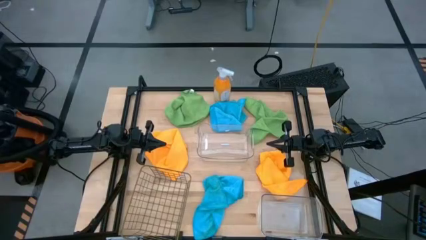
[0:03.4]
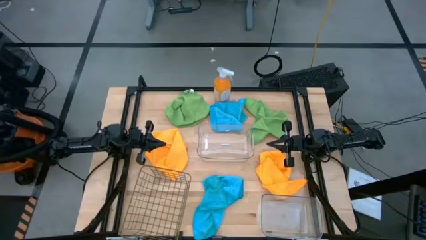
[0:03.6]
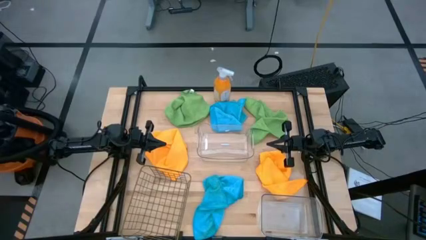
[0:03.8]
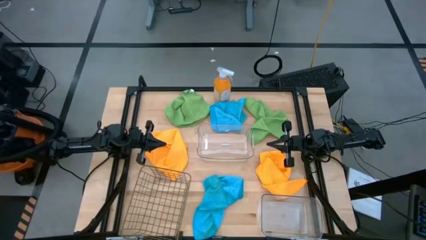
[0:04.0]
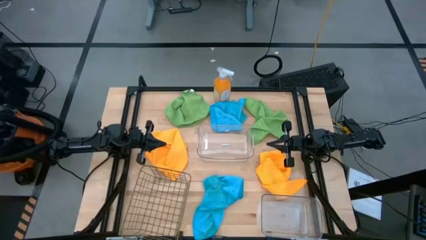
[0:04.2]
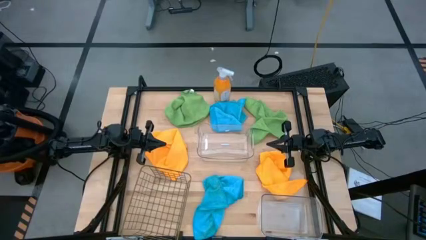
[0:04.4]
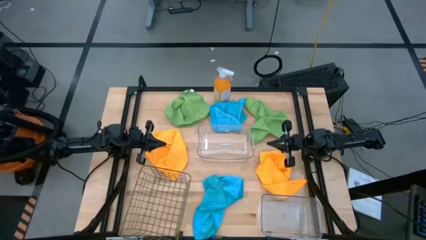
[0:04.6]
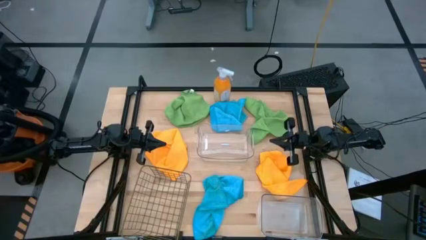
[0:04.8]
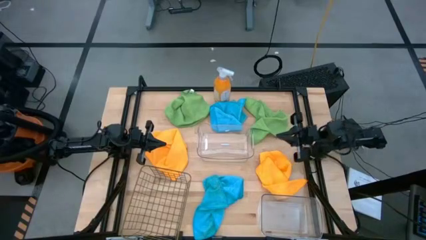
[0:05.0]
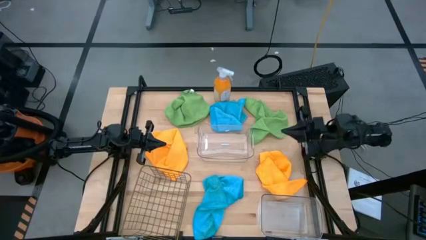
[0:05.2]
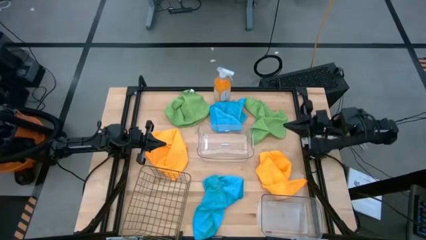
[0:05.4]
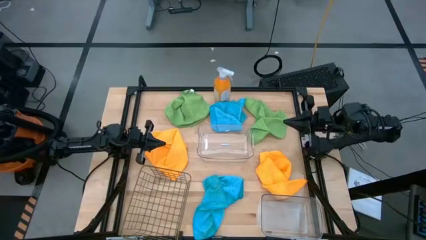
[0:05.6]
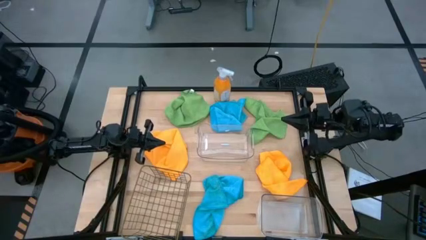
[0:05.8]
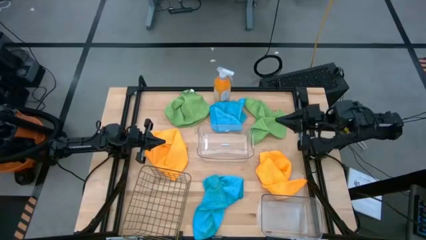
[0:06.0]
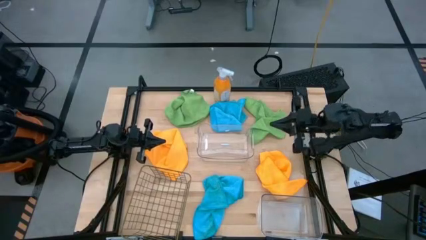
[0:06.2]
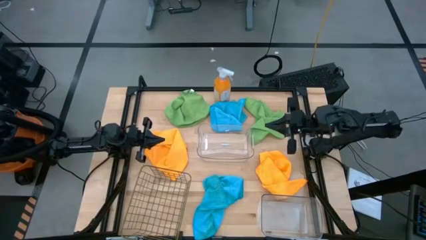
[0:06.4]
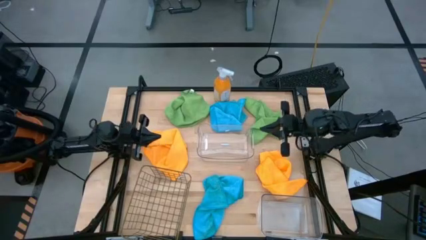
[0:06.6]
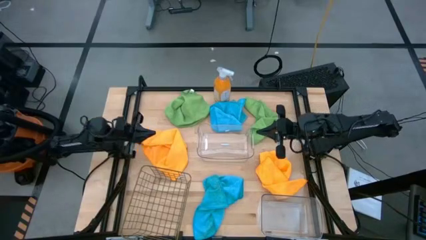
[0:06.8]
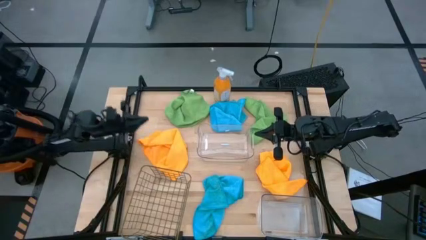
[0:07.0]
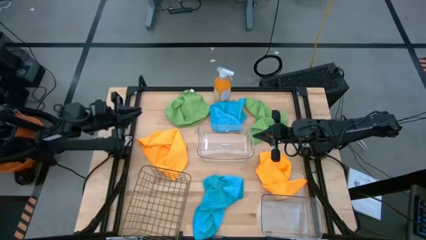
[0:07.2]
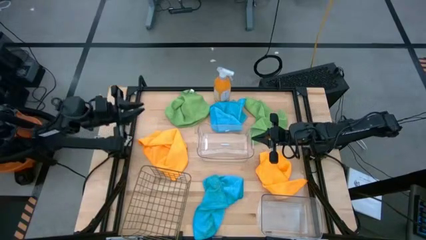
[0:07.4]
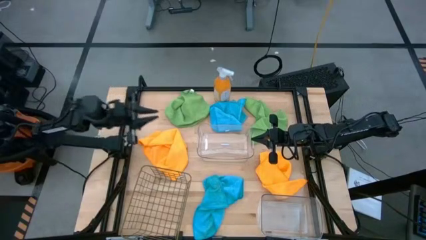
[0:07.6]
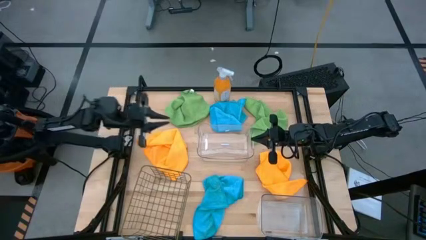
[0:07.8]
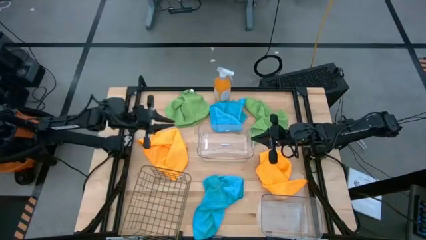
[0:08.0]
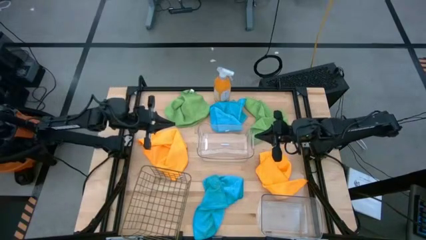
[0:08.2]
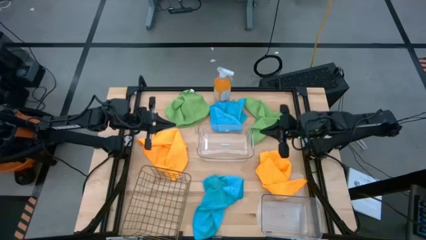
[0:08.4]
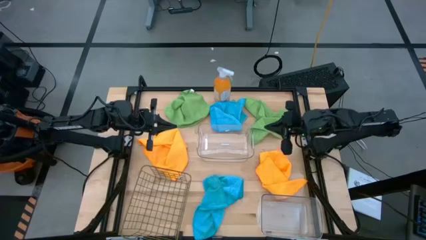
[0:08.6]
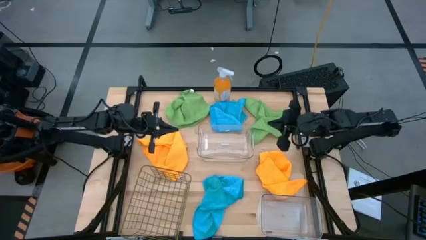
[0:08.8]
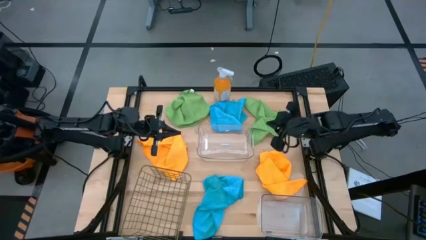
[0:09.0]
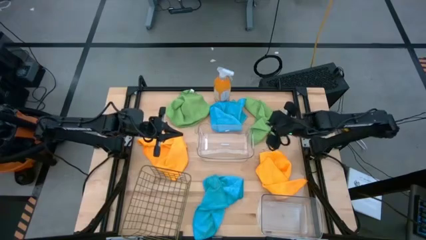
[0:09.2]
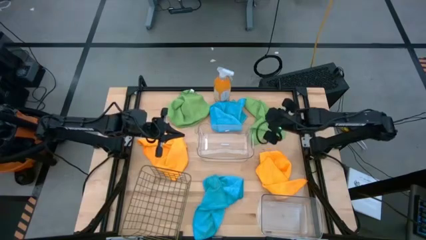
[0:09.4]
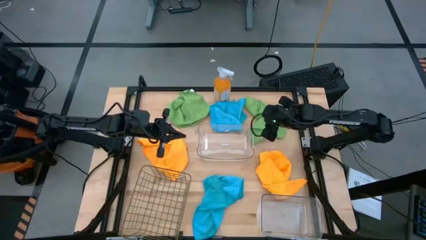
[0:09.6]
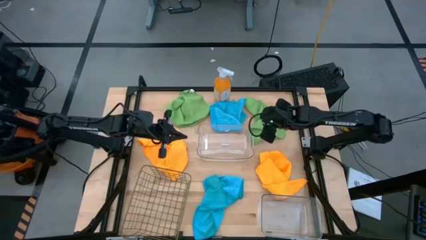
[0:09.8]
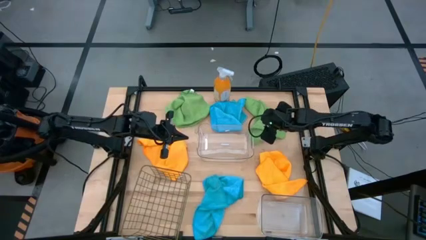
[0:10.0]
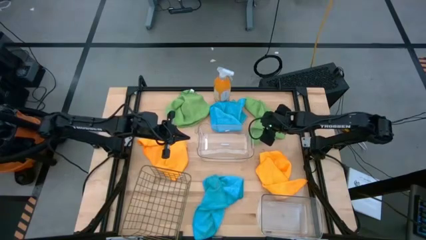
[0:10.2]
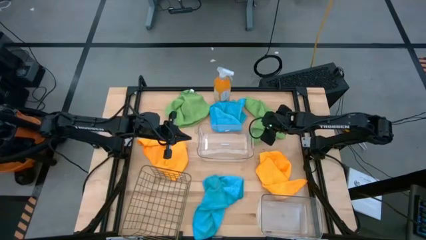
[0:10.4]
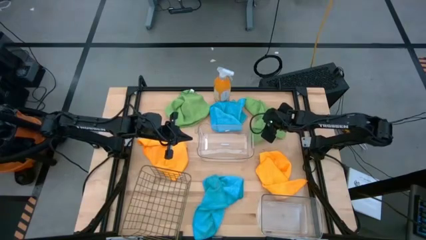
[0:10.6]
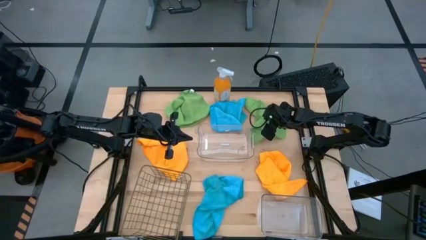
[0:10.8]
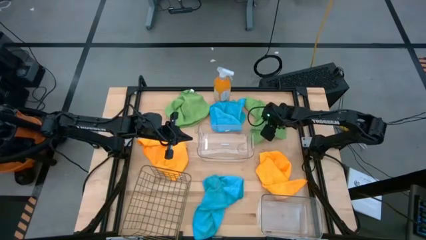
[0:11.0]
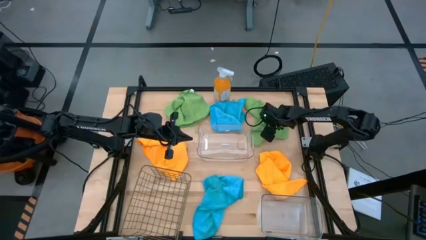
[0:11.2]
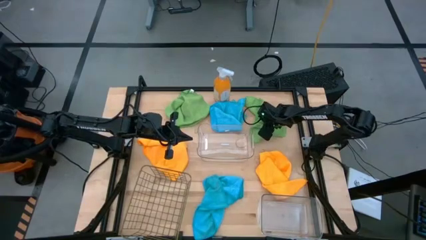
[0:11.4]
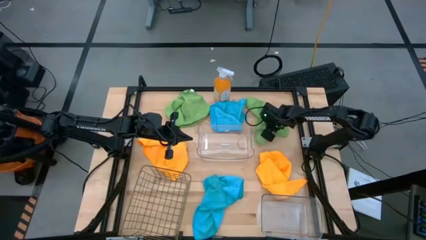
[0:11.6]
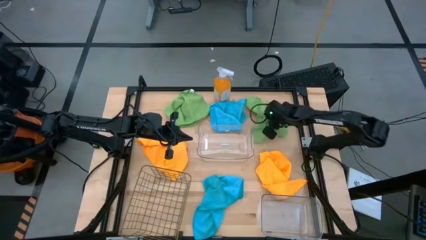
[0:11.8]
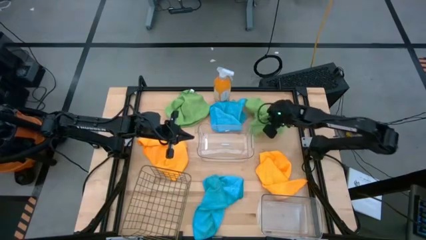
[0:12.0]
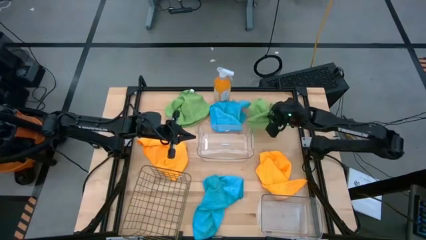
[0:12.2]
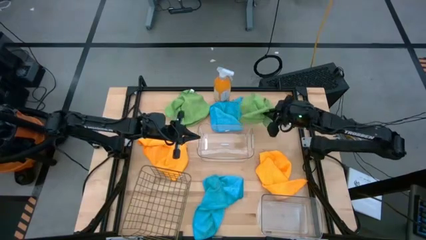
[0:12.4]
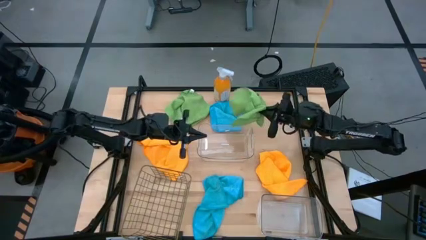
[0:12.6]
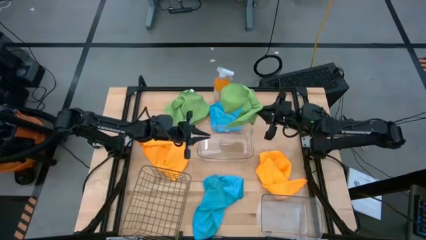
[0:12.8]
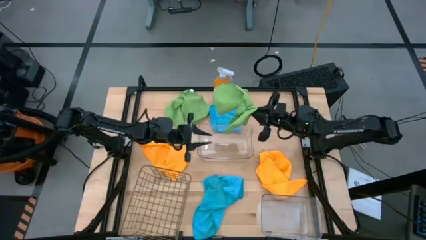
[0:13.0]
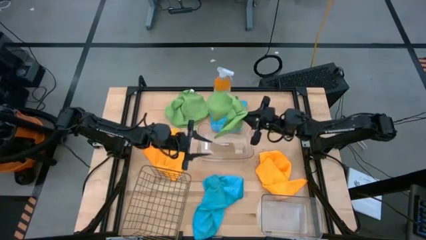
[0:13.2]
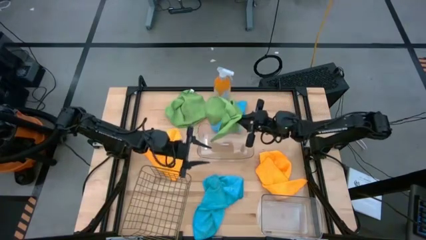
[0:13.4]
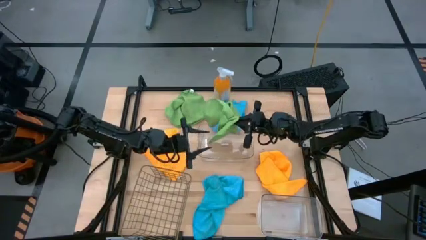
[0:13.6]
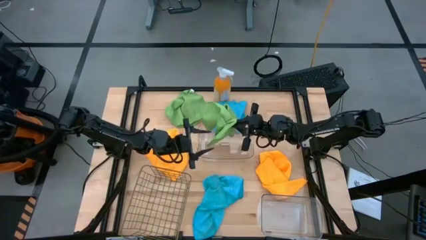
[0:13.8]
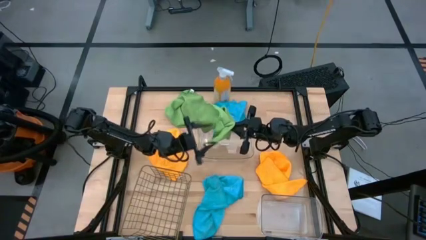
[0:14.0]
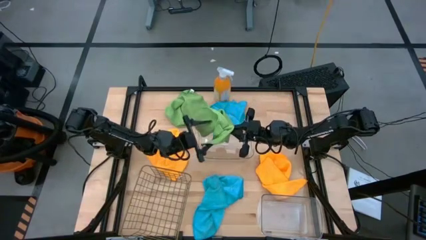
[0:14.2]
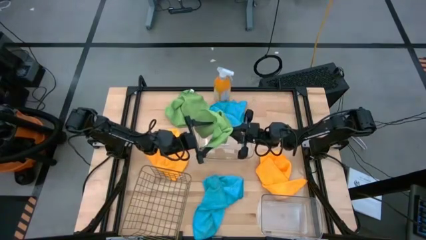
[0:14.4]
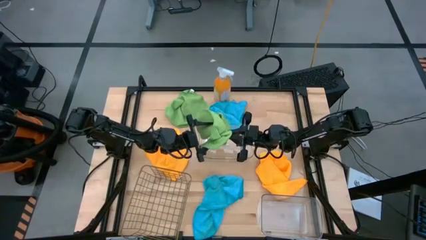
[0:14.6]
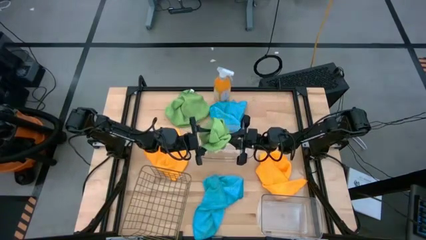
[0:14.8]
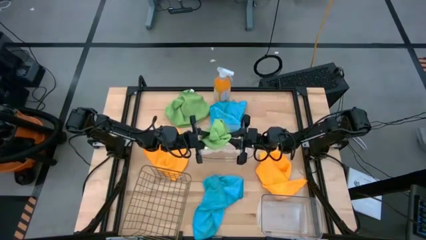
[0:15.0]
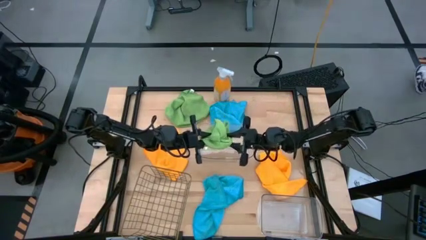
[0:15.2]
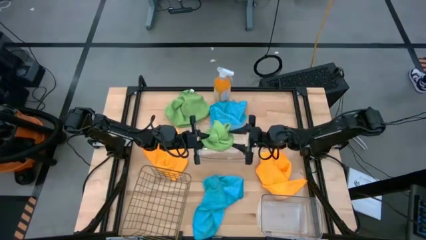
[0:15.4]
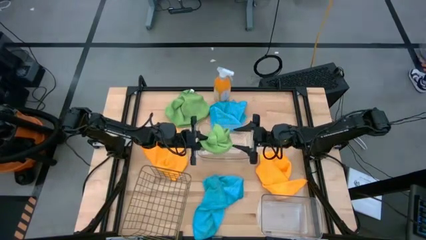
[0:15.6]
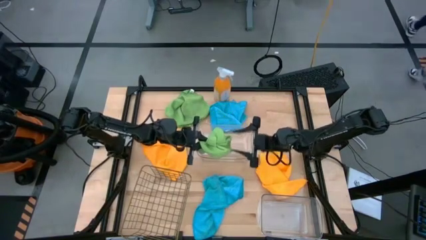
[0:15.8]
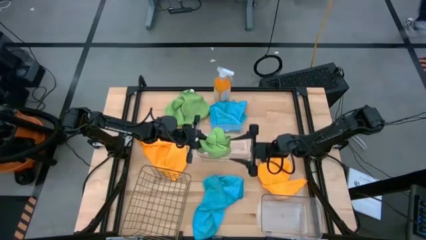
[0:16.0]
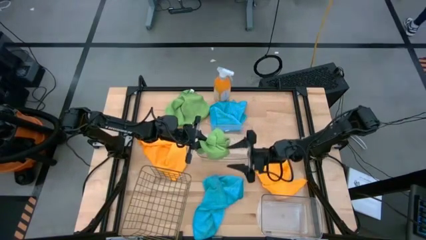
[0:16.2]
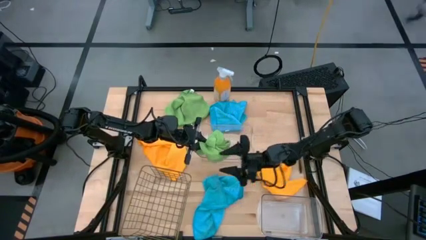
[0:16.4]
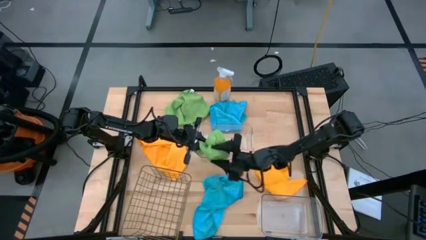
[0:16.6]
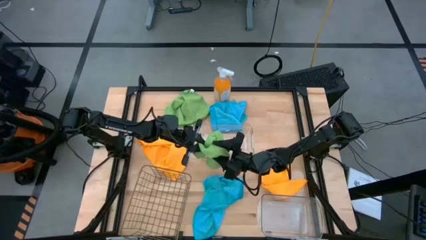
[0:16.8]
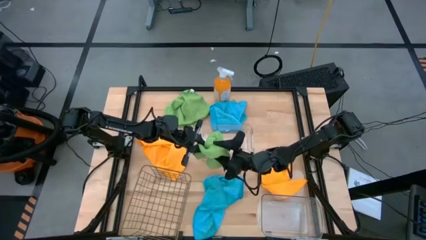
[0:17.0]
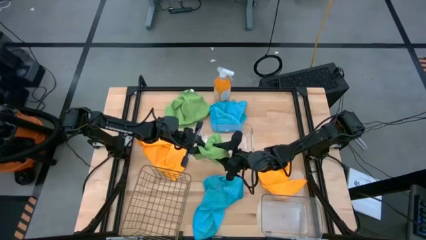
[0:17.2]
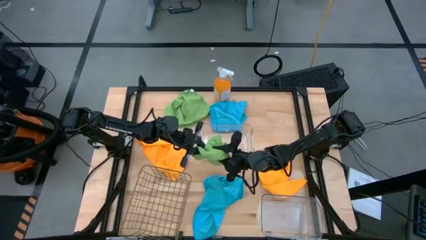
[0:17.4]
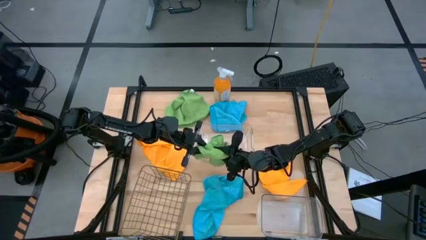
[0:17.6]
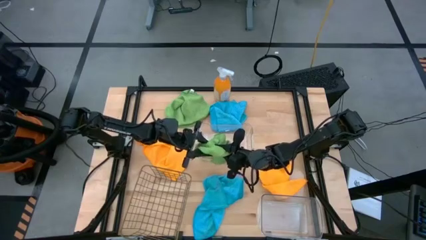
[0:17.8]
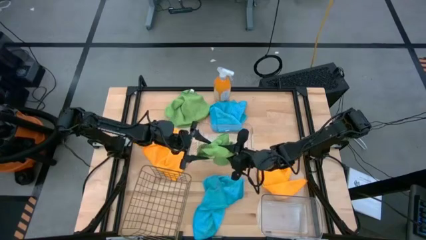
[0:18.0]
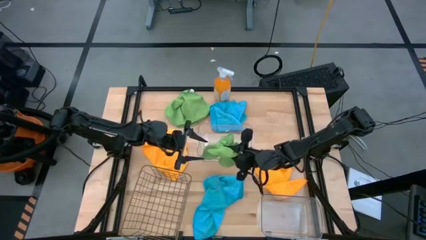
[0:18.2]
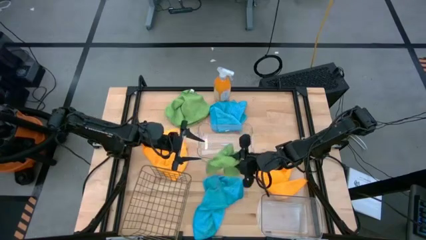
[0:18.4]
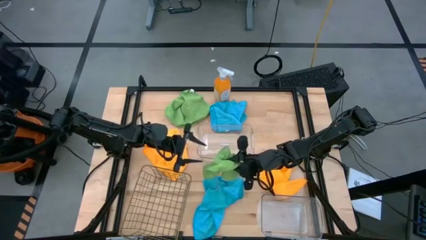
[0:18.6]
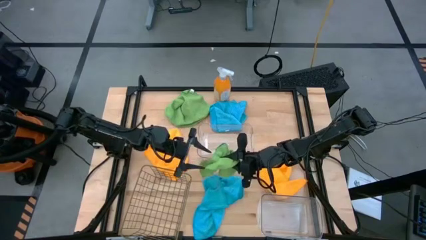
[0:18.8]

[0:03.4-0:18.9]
Task: Sort microfiber towel by color & place in baskets
Put the right green towel into the top transparent bin
